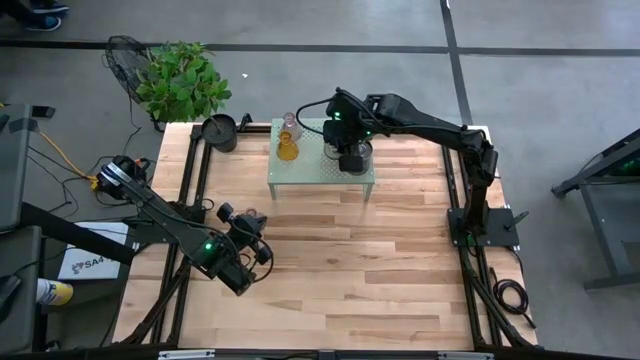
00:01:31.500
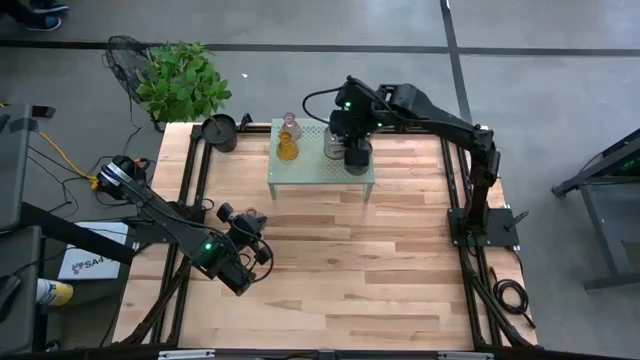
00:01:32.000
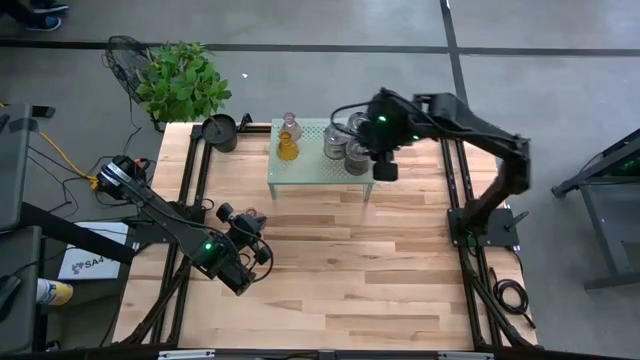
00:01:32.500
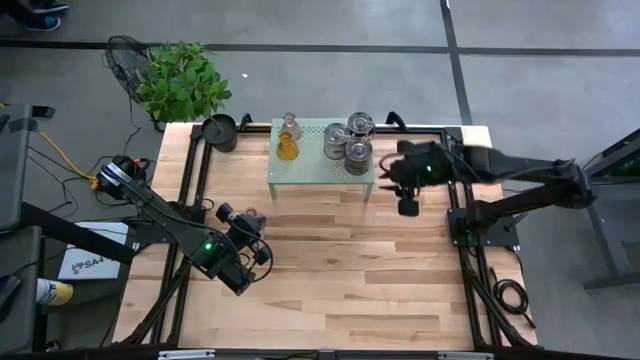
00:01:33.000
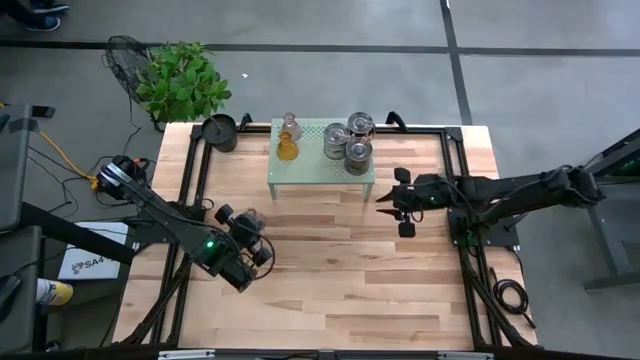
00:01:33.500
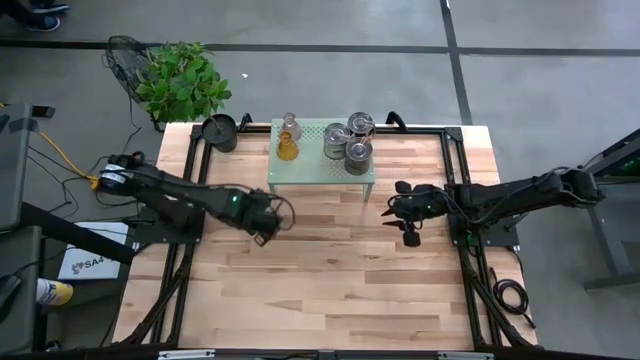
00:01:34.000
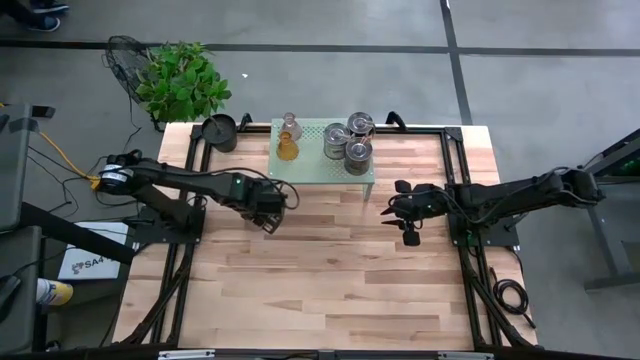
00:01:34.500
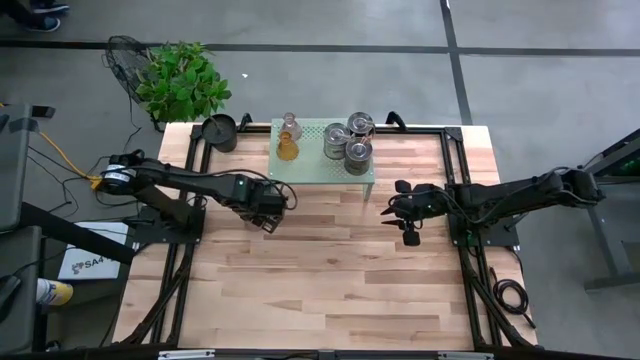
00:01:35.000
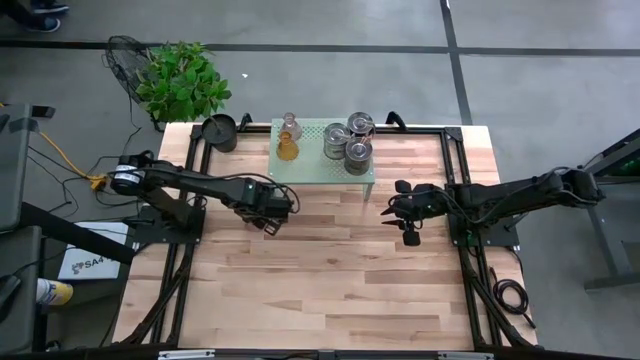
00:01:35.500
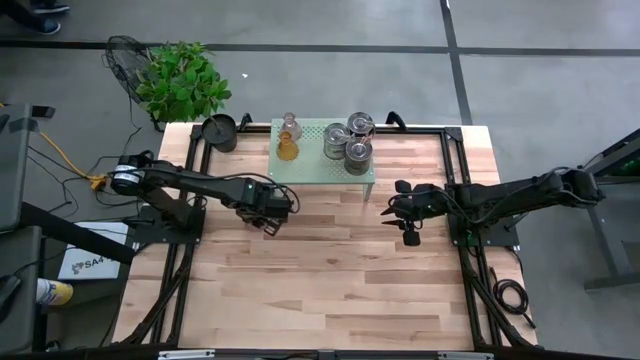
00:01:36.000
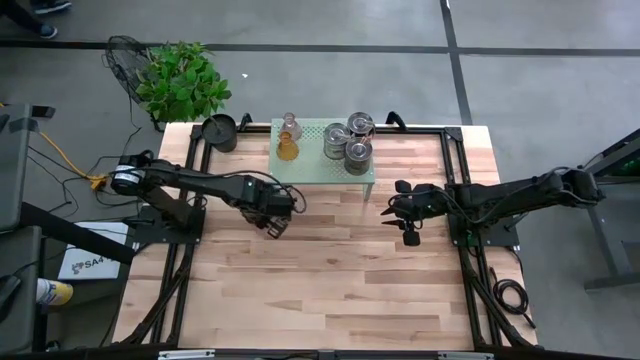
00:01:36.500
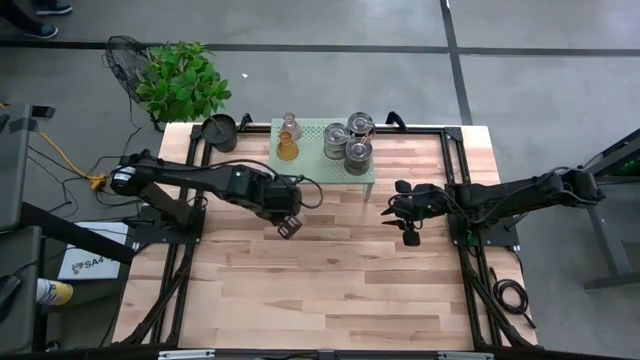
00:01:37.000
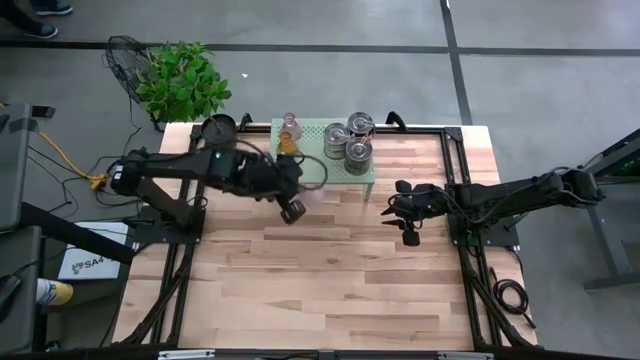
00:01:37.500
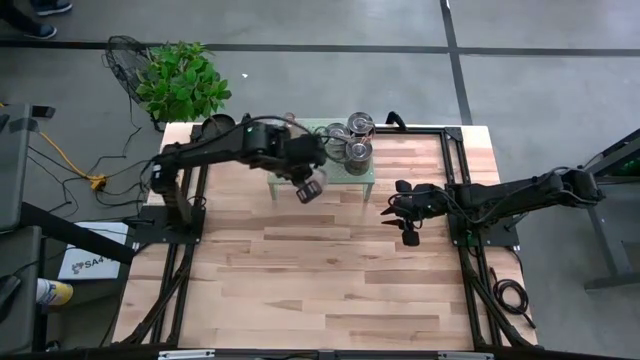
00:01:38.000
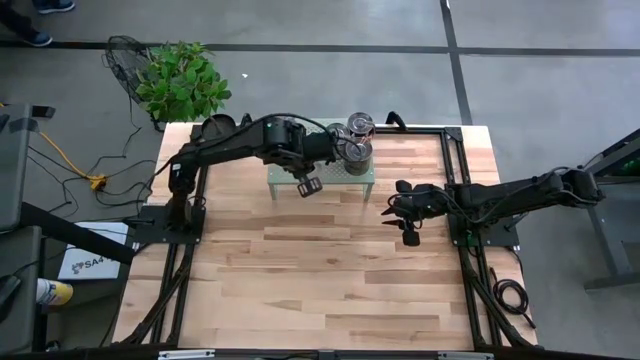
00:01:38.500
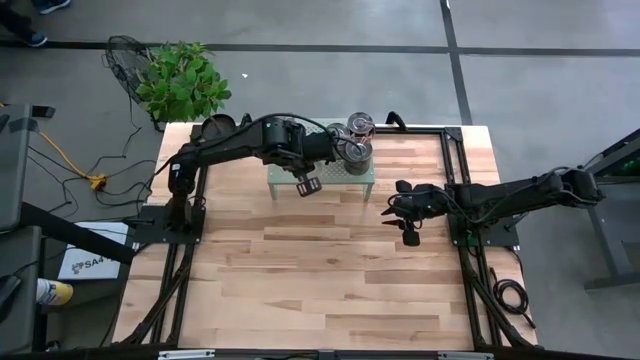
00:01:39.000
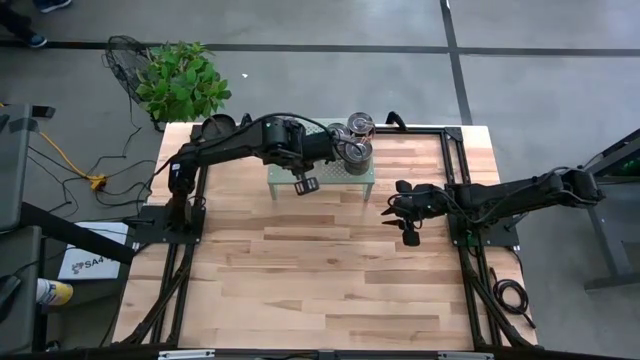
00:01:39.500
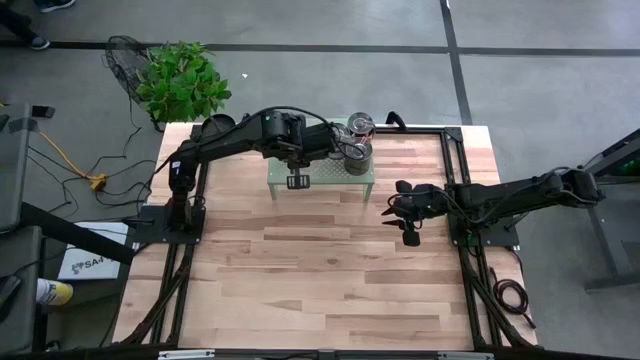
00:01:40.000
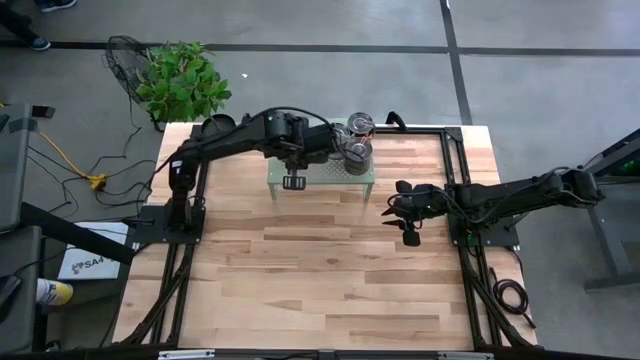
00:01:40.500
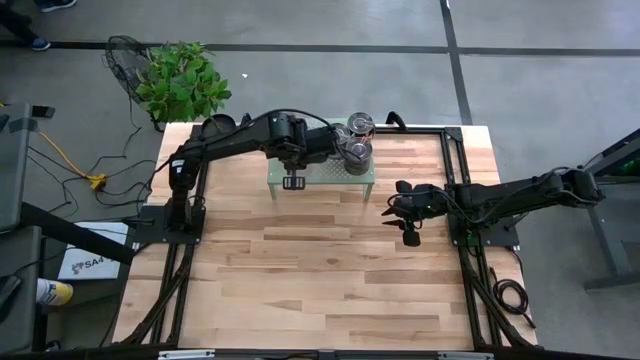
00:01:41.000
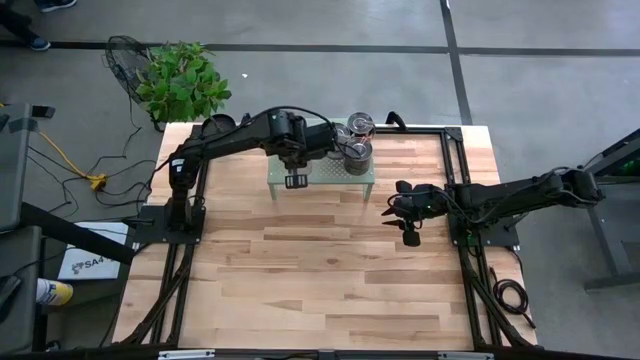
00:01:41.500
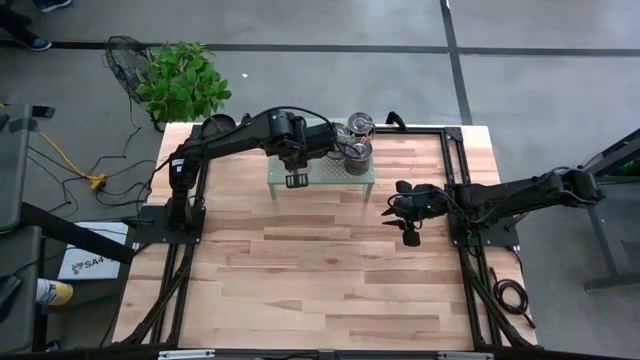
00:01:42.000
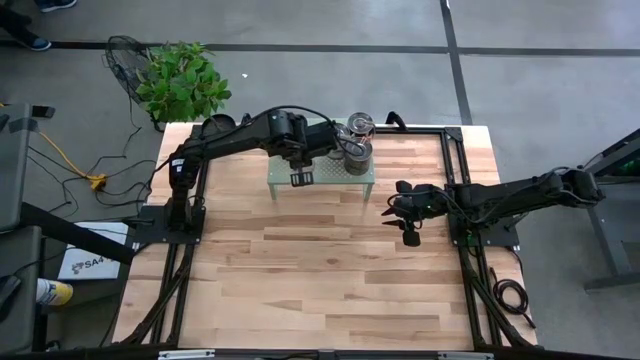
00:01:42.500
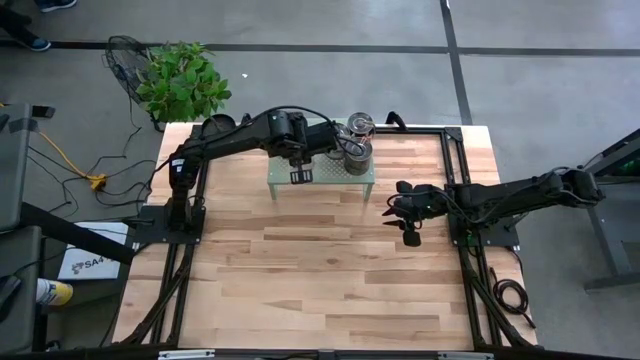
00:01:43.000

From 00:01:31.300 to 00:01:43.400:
Task: Pick & Place candle stick holders
Put the pink candle holder on the shelf

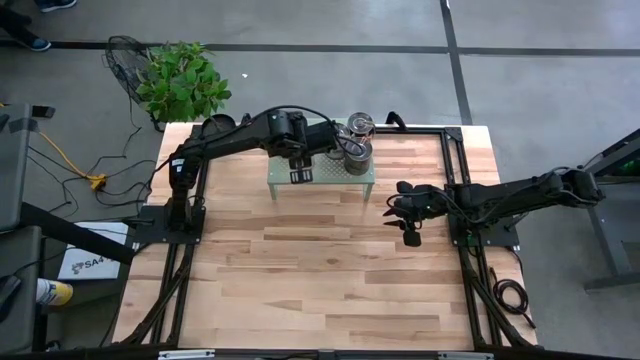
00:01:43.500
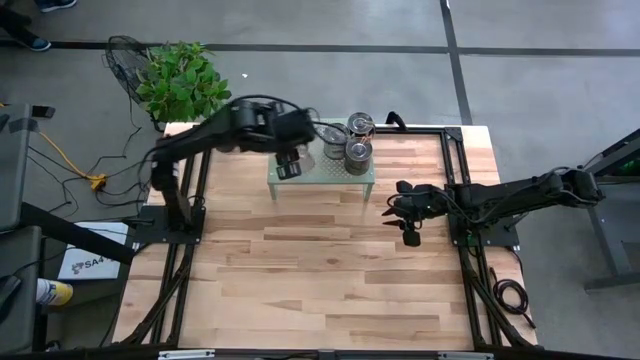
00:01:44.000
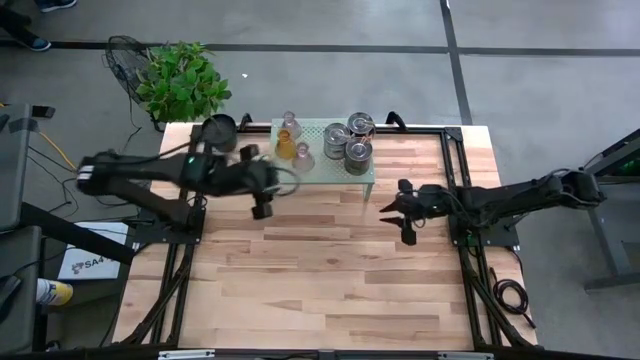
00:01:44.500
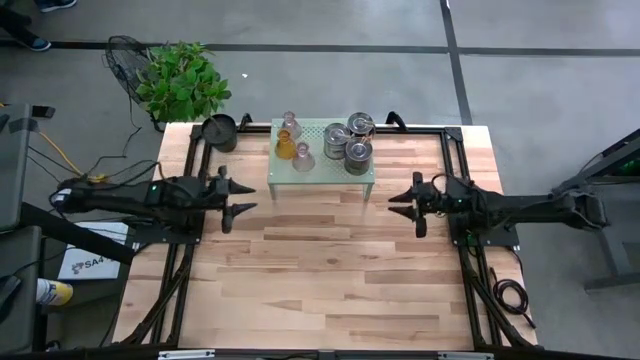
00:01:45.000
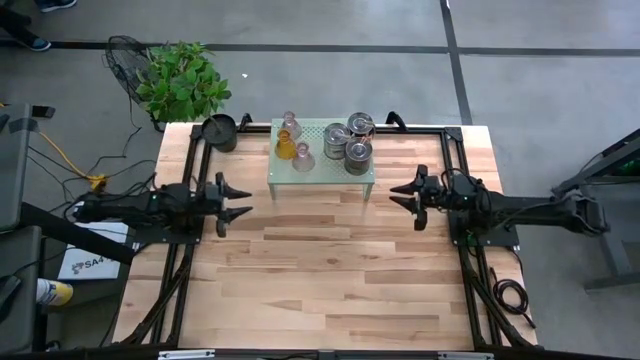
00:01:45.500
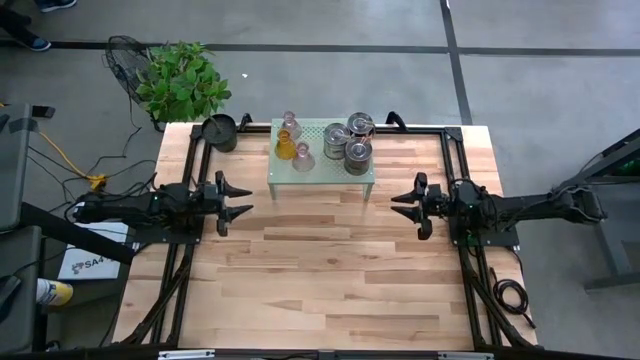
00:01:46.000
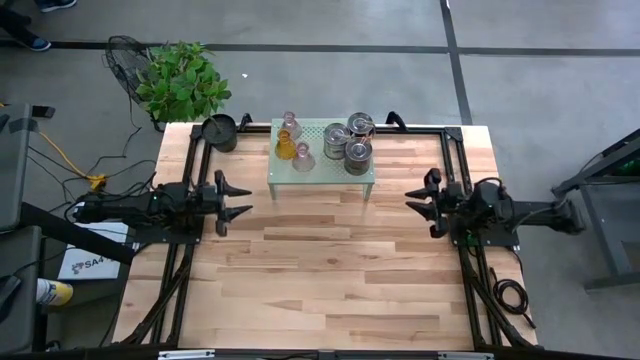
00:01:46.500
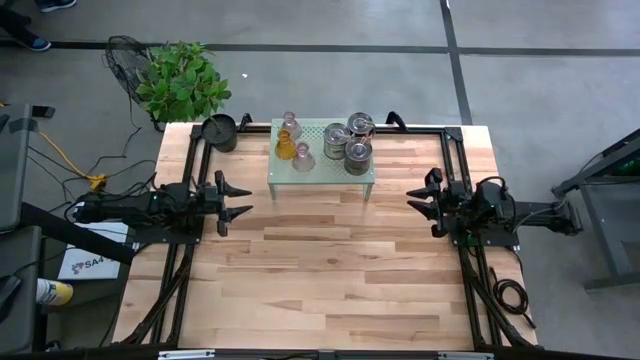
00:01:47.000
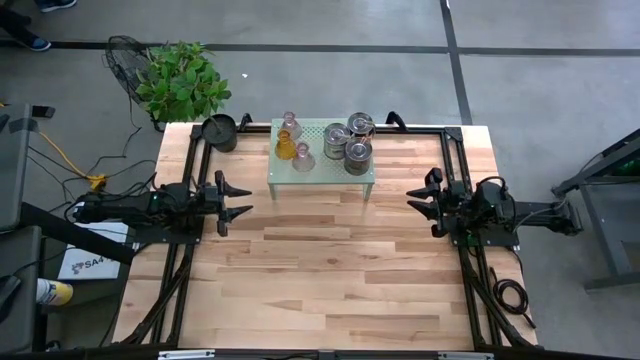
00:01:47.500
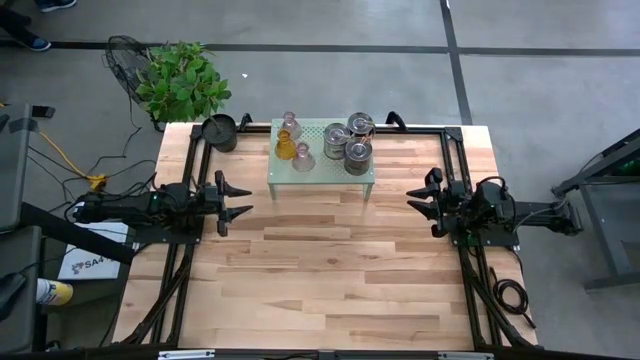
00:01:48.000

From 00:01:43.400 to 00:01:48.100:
Return to Home Position

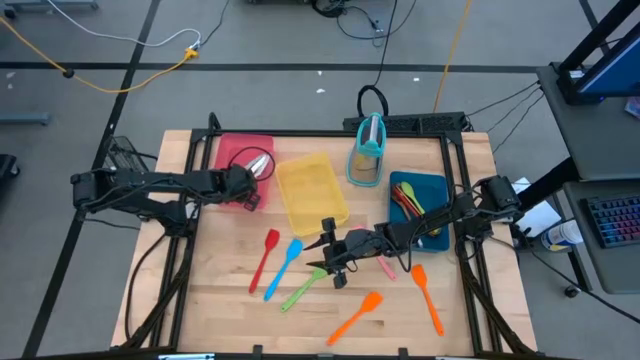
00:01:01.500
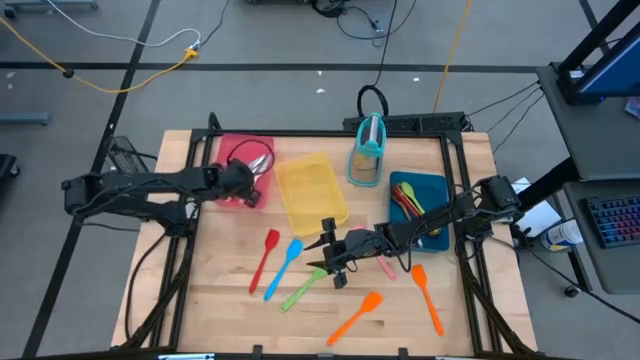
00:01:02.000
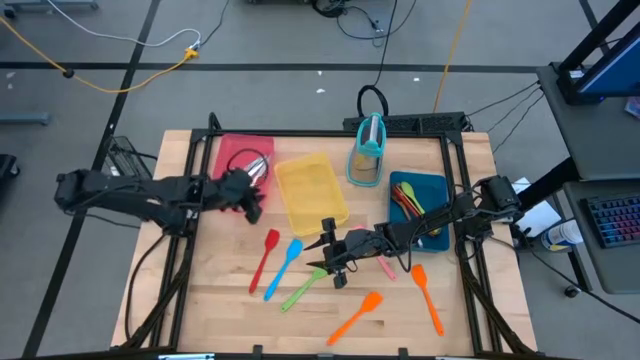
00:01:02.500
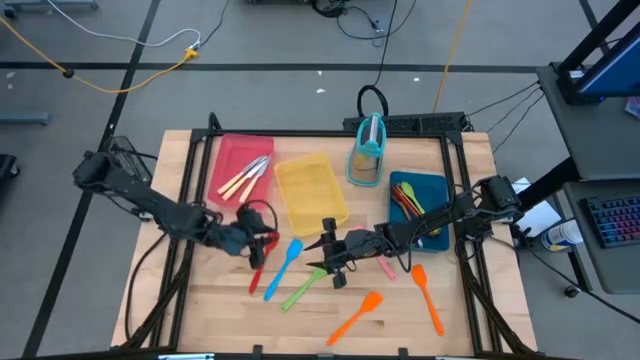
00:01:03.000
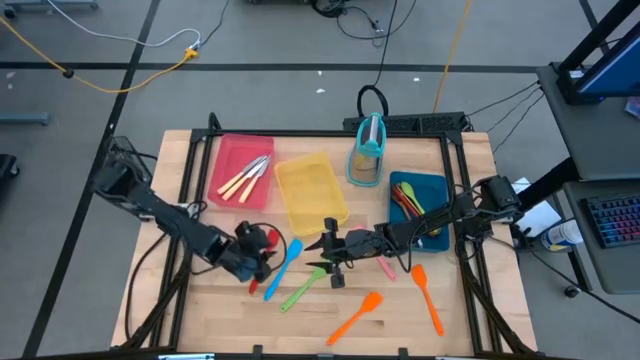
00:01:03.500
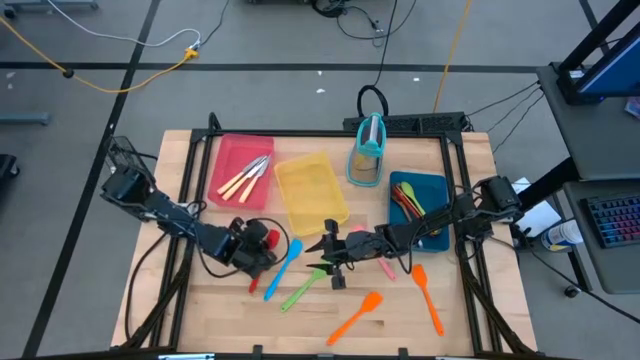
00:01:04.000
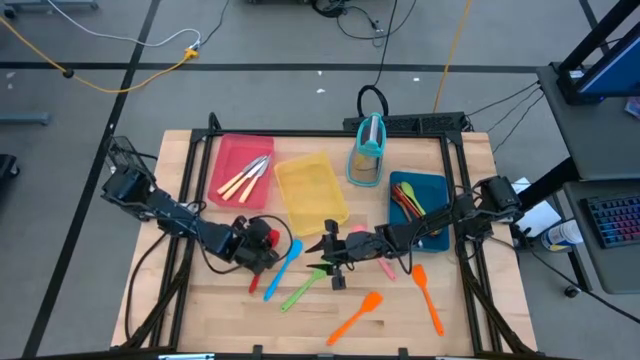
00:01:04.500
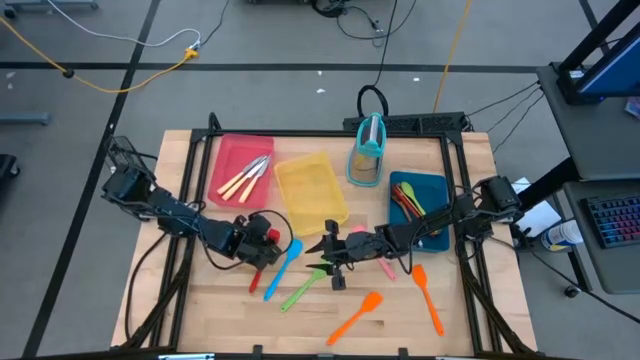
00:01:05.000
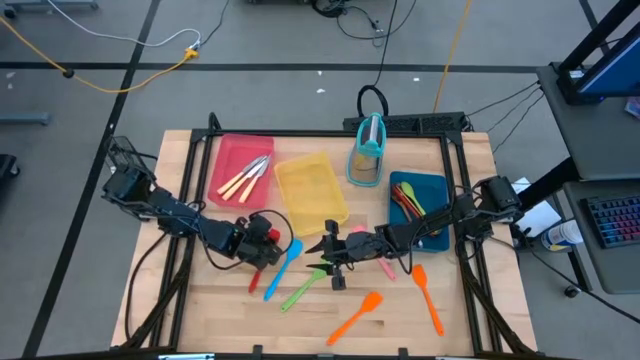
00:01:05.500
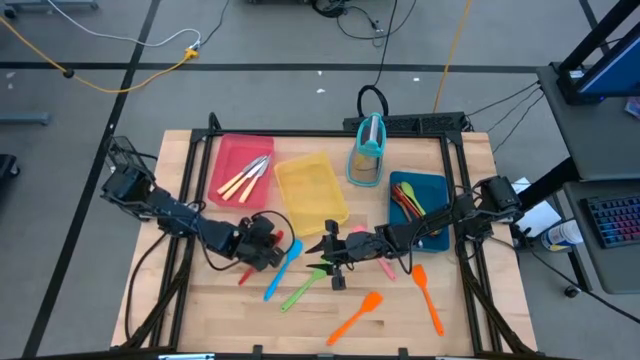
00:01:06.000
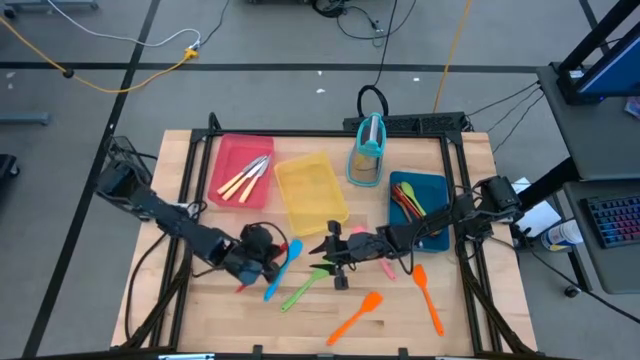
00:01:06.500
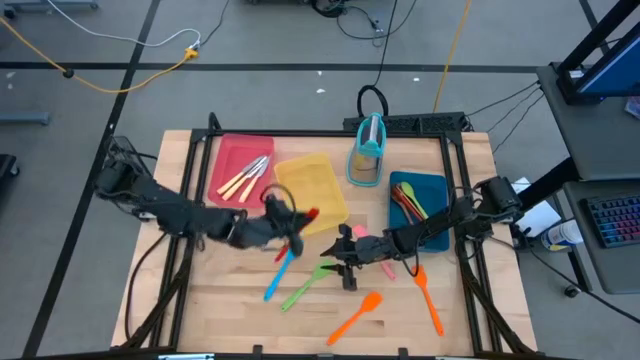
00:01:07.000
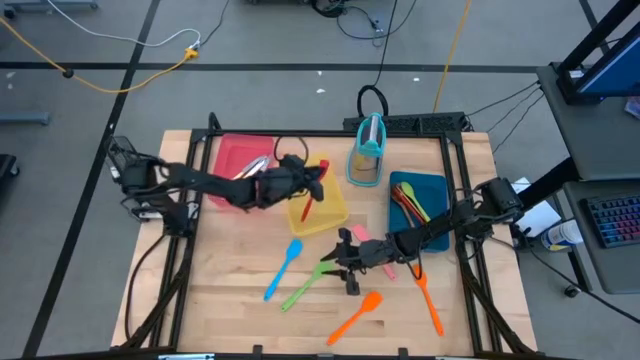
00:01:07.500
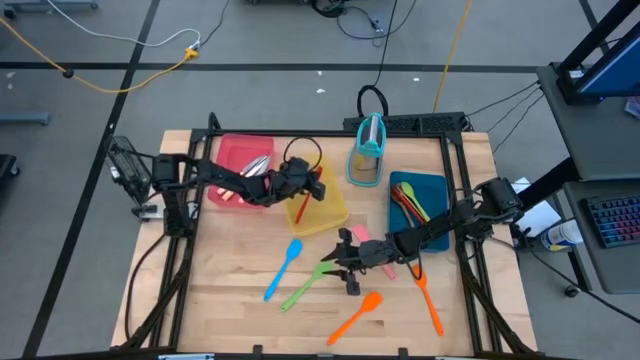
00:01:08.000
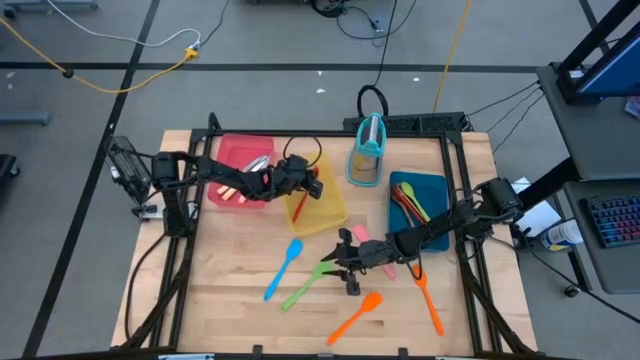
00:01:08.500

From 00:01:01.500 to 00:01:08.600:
Task: Pick & Place Kitchen Items
Put the red spatula into the yellow bin
